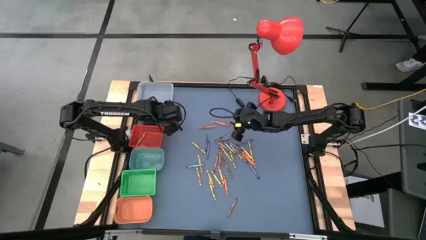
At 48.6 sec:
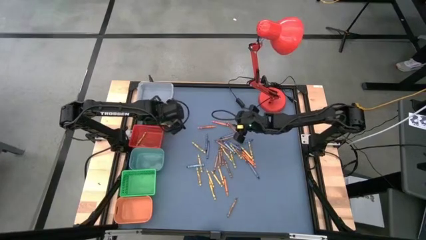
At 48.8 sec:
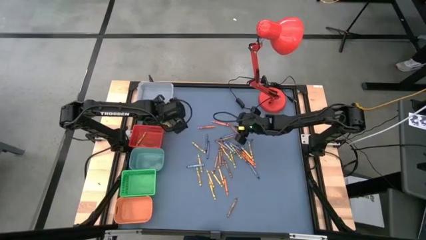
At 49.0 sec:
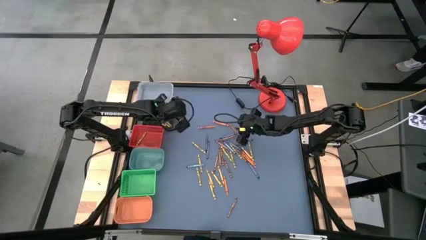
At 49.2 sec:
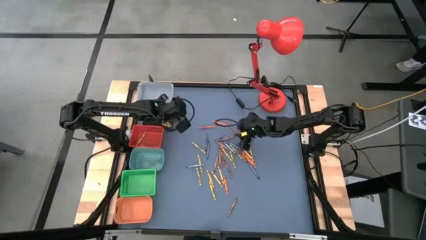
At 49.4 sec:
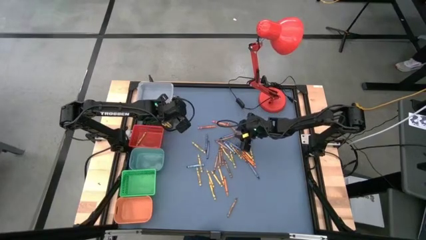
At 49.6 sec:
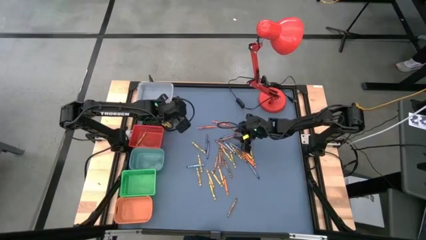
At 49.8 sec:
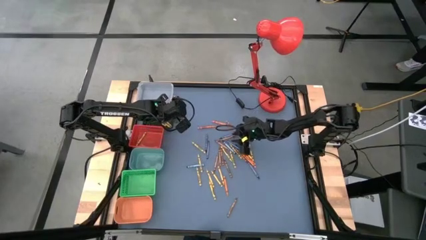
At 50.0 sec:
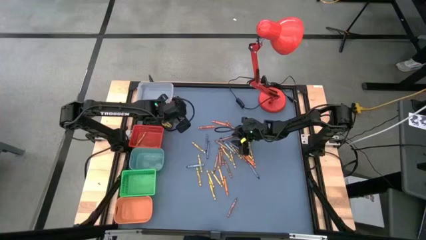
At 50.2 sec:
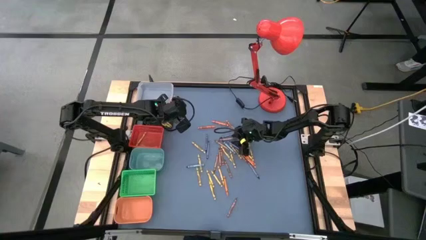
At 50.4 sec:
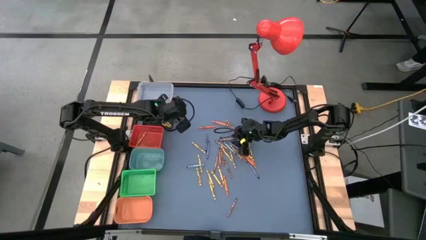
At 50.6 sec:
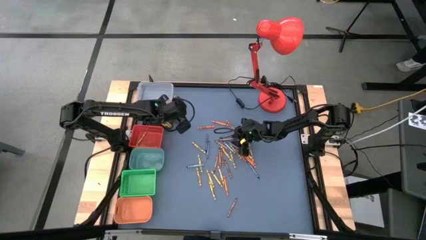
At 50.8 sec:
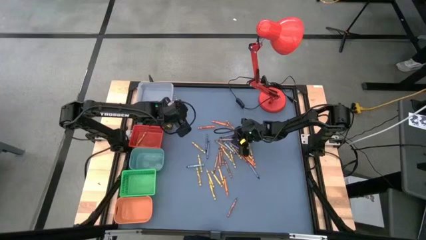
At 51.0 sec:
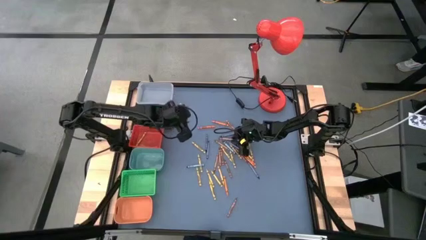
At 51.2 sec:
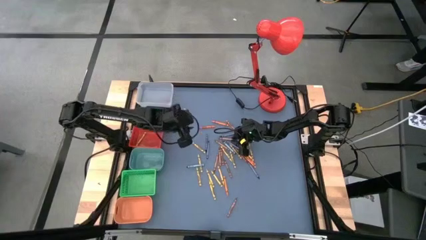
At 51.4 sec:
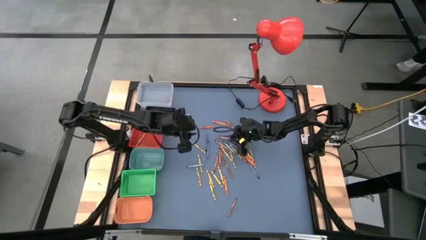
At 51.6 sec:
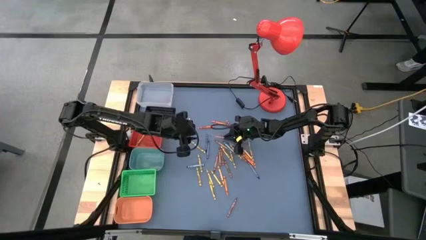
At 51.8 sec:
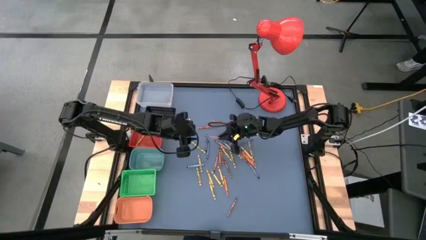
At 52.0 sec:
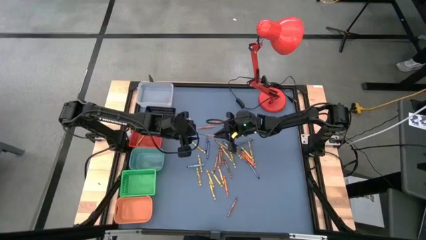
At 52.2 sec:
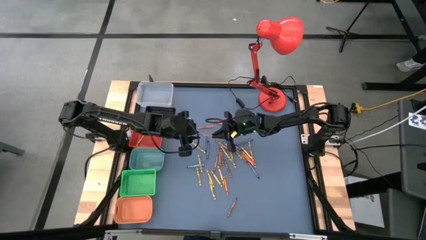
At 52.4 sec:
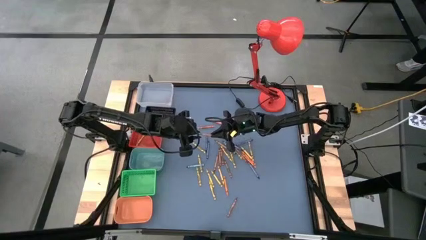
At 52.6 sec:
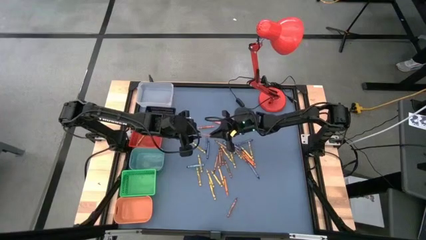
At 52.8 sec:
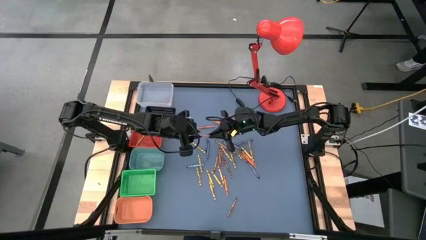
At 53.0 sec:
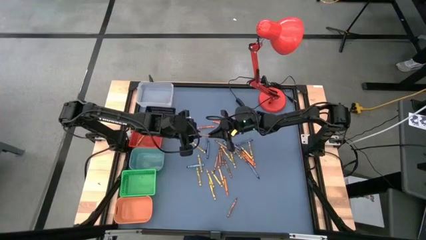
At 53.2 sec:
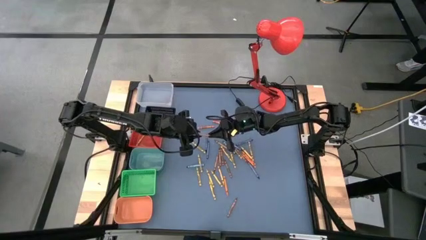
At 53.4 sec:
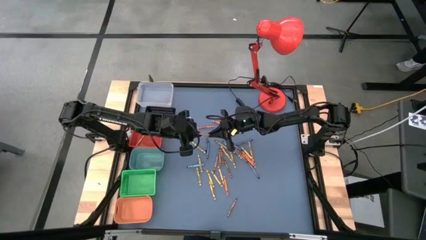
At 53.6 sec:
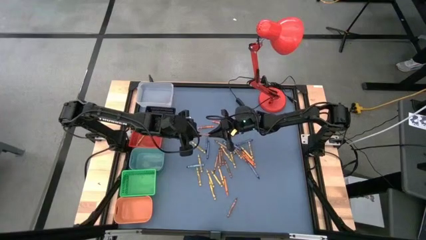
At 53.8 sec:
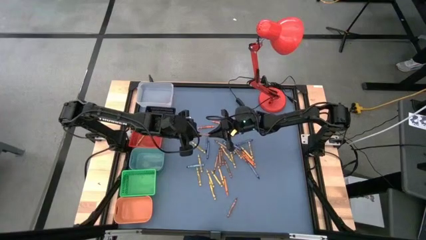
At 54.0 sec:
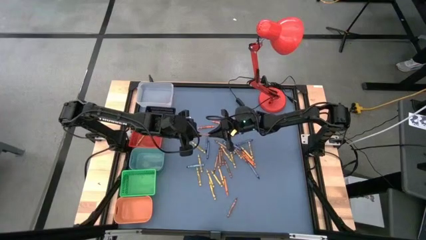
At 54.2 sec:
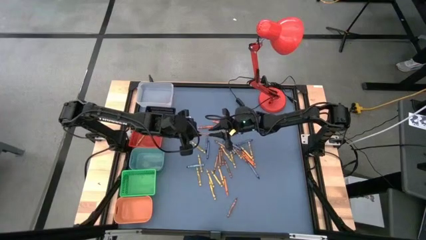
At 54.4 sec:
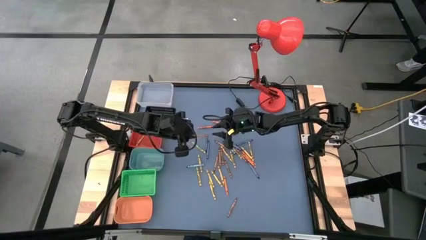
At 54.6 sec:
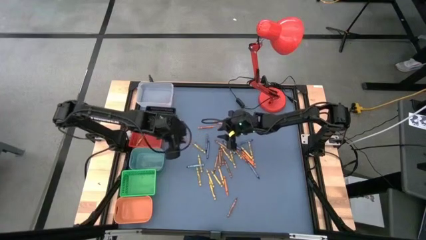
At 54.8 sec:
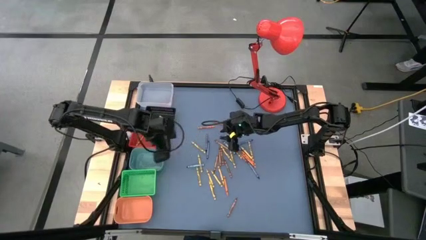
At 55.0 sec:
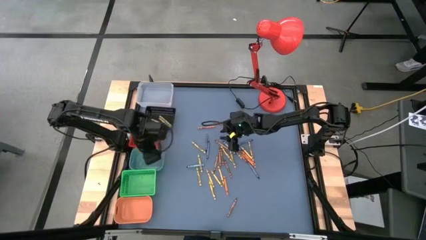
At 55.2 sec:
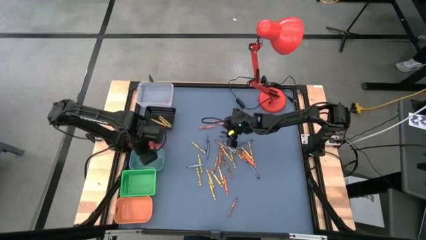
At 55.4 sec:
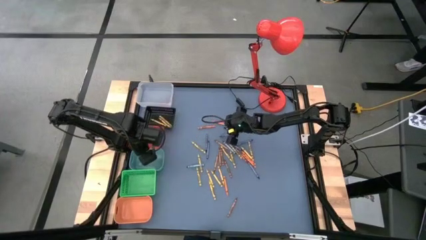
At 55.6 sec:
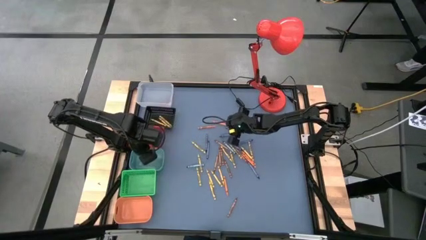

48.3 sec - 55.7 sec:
Task: Sort crayons
Put the brown crayon into the blue bin

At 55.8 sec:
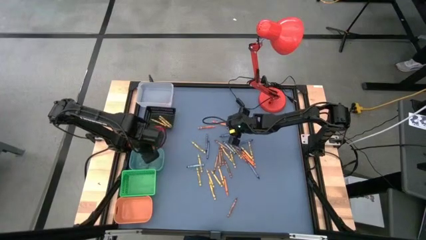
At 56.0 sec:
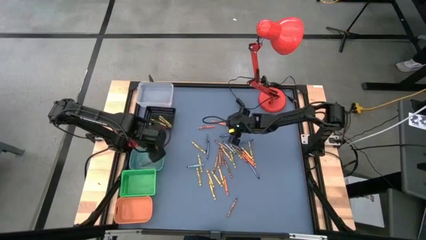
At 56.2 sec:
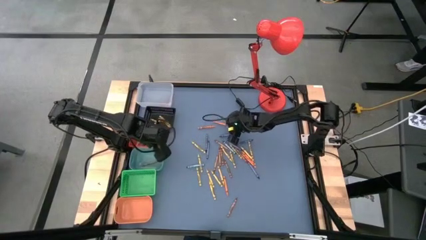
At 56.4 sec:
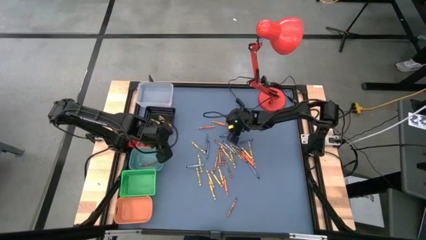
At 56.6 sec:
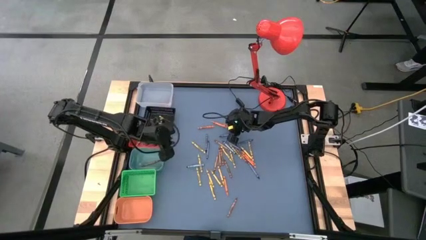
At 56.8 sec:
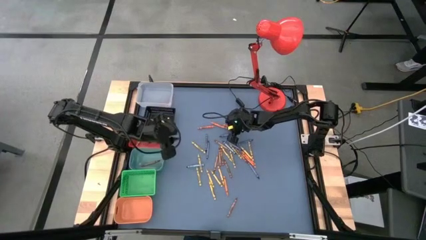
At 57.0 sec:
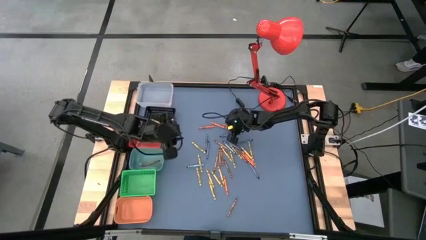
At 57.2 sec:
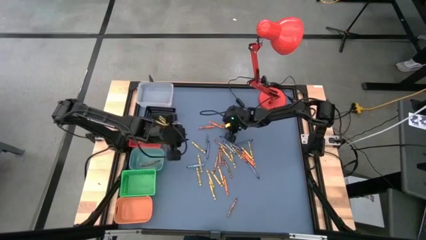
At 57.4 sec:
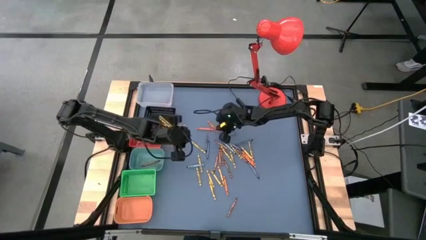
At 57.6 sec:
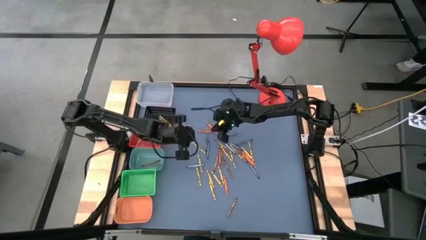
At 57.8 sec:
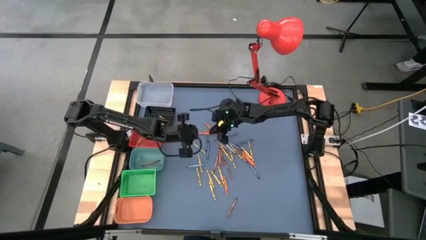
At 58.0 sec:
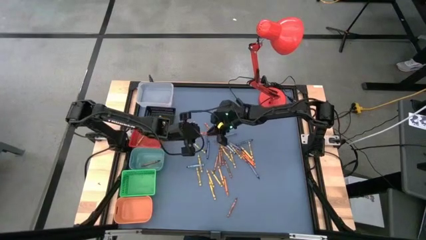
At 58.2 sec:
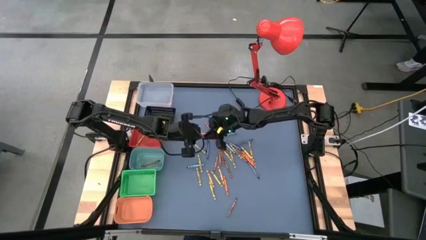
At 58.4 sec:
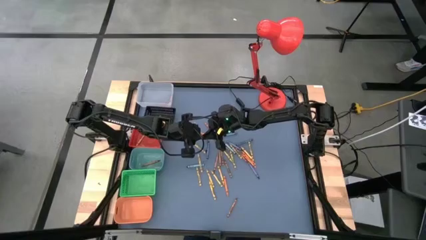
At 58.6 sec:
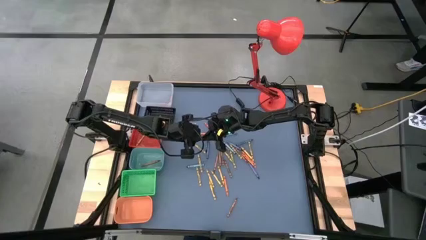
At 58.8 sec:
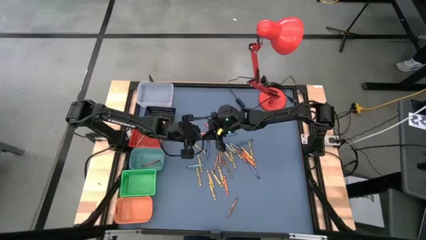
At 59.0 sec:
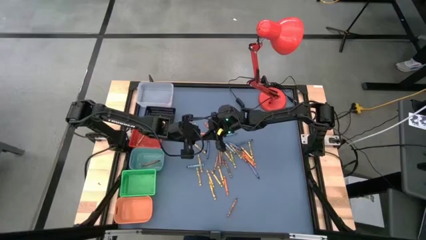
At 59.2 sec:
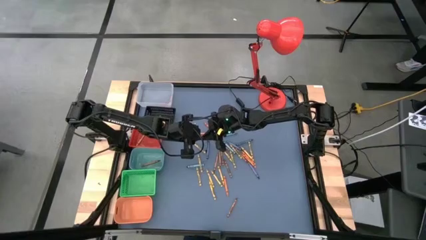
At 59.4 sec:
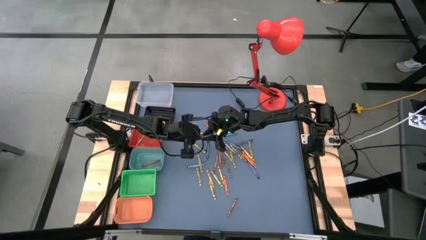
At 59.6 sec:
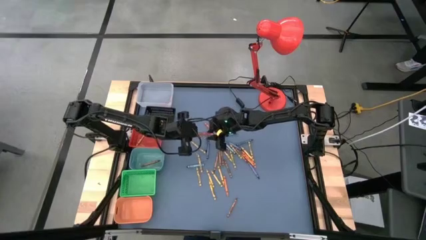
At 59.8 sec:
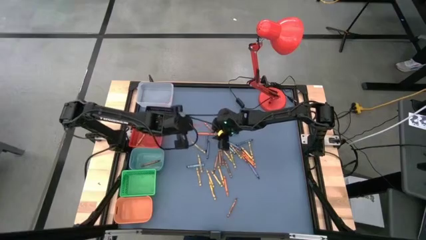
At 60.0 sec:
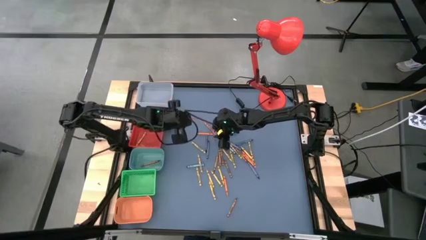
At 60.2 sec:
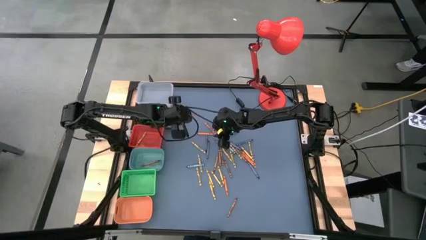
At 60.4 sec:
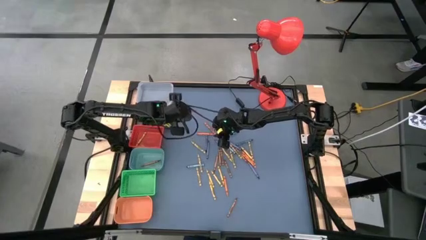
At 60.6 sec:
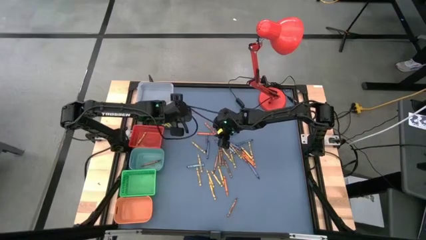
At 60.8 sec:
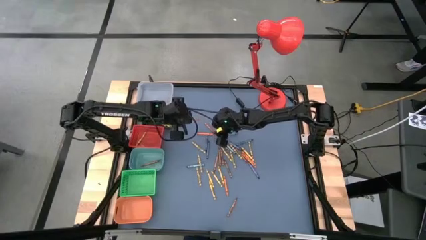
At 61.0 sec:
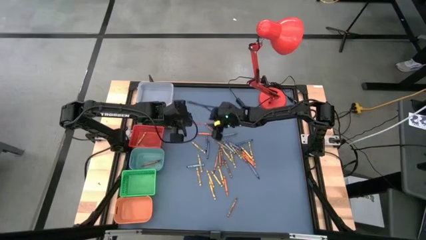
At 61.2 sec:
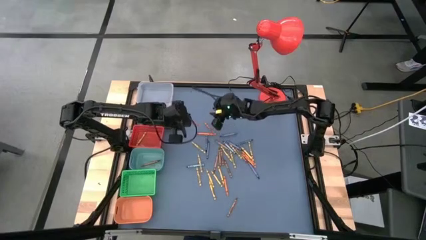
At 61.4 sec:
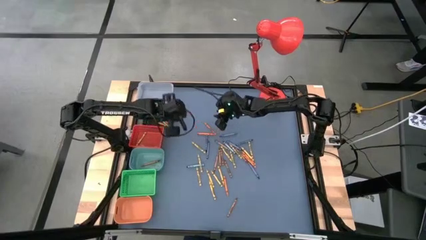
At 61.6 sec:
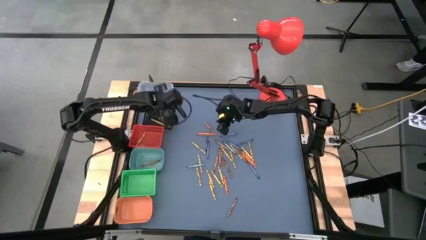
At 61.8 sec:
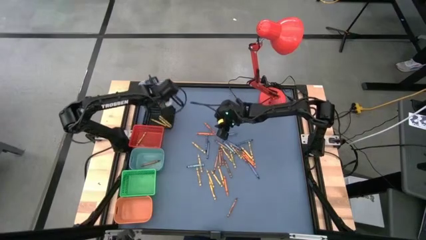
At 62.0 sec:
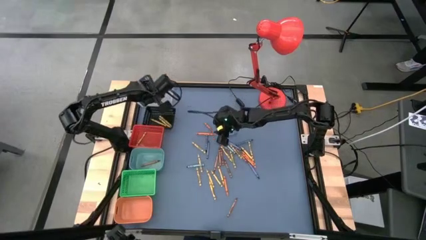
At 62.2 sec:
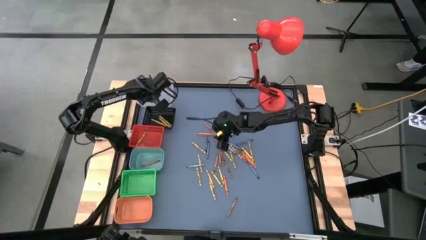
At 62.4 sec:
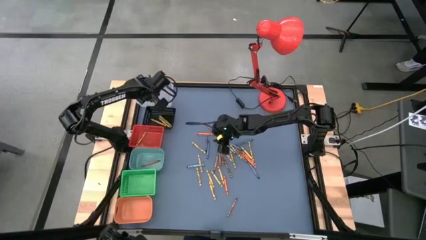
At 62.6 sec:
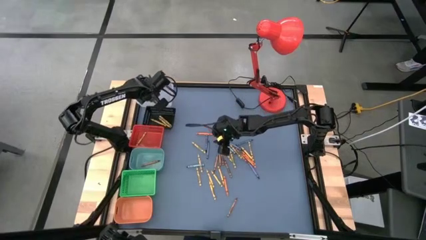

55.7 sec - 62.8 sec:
Put the orange crayon into the transparent bin

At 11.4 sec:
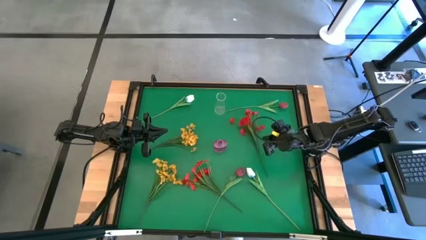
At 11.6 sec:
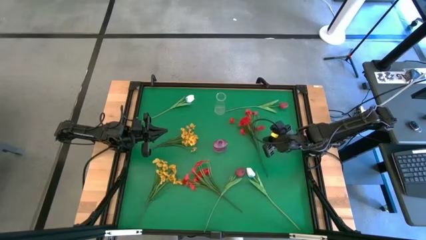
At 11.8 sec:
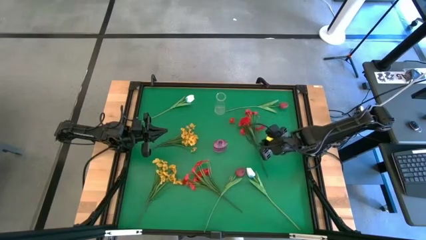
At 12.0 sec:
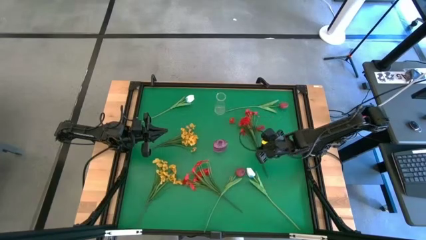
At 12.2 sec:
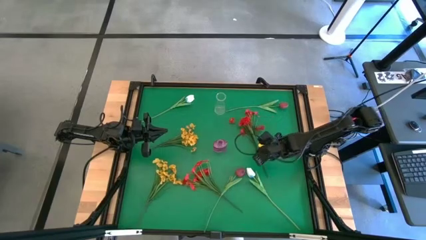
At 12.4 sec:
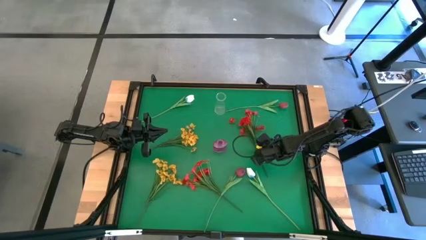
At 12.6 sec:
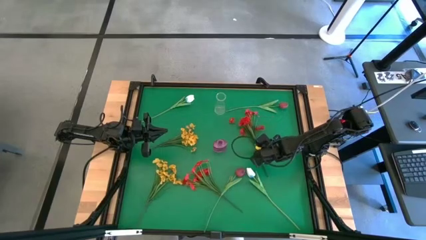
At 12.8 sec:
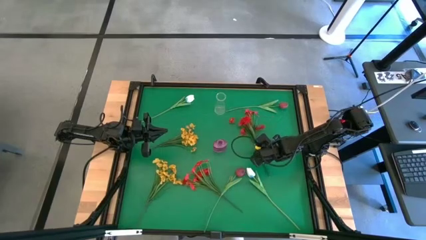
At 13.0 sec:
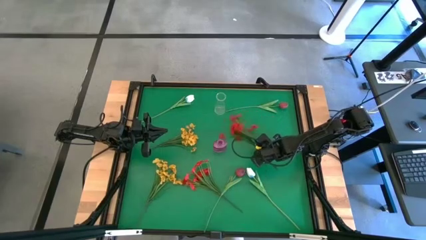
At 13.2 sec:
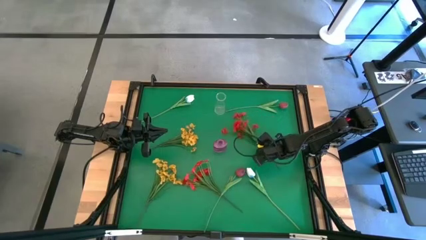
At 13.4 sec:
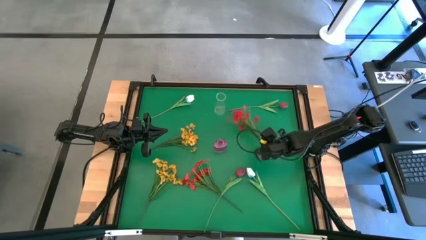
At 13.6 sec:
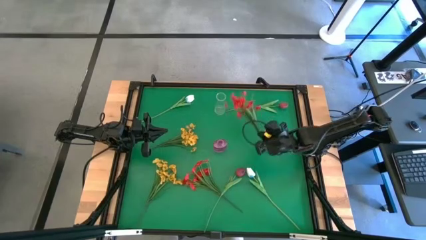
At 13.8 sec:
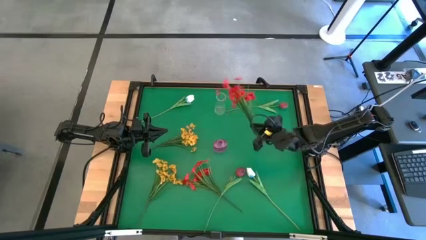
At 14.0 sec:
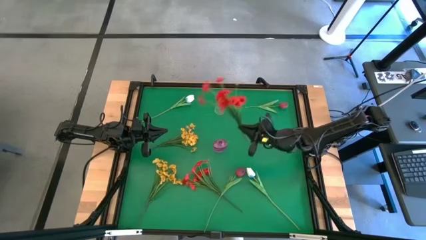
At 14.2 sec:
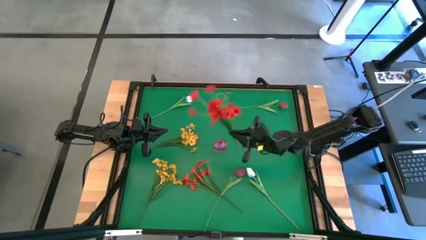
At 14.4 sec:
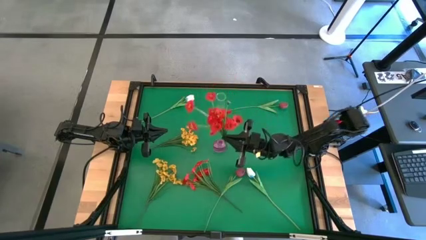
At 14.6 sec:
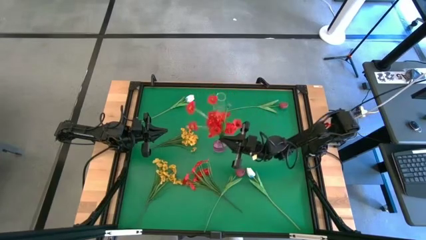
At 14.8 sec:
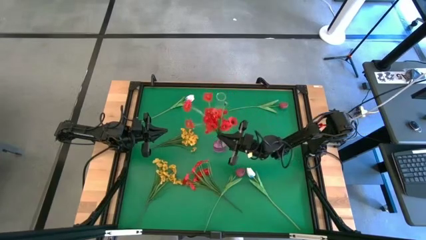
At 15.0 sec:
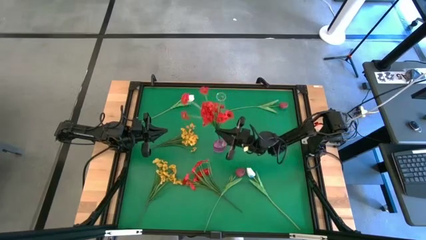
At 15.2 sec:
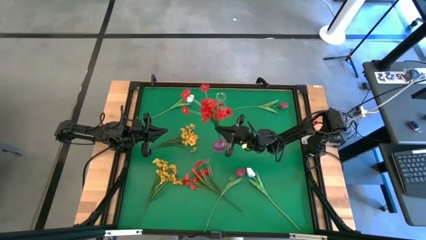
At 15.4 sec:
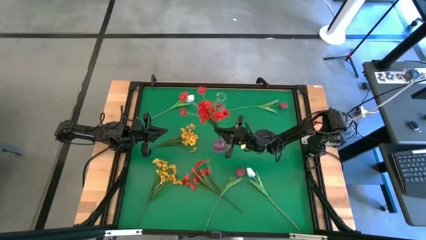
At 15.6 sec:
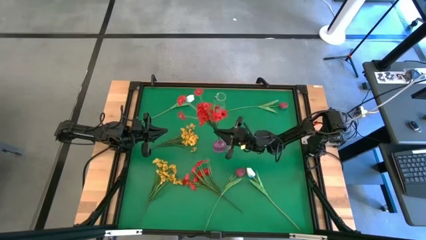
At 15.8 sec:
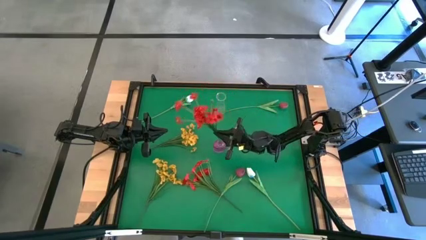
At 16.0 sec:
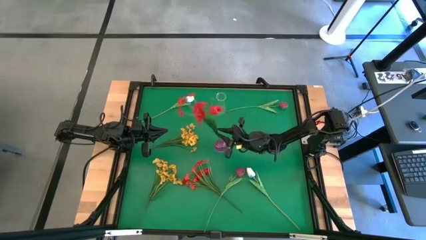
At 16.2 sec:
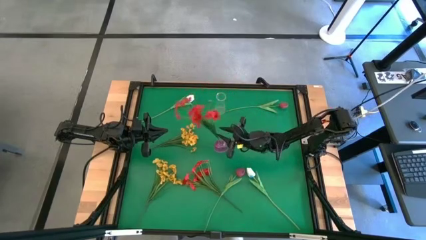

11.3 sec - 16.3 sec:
Task: Sort flowers into vase by color
Put the left red flowers into the pink vase
